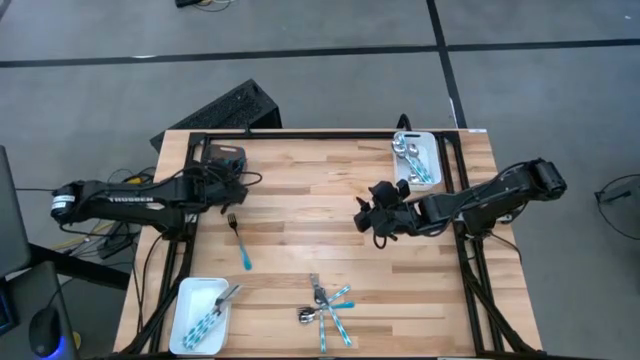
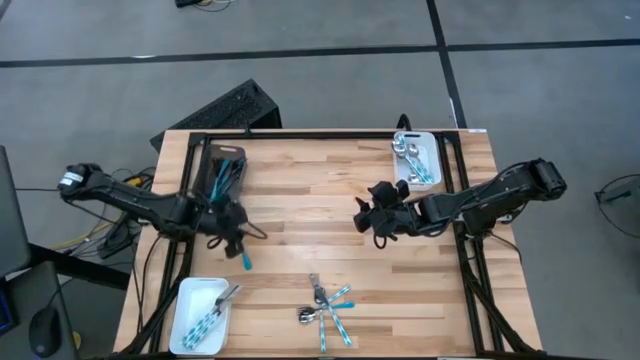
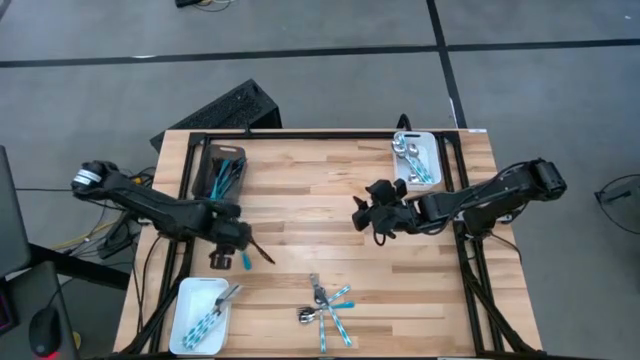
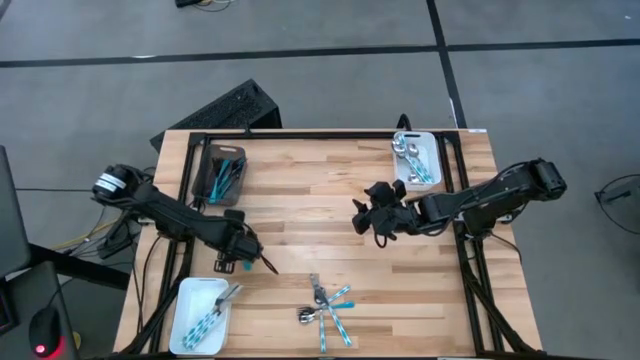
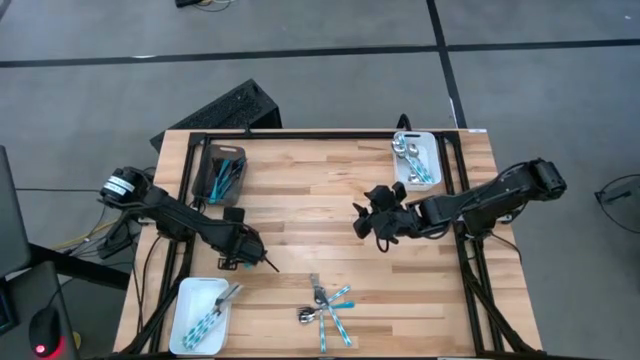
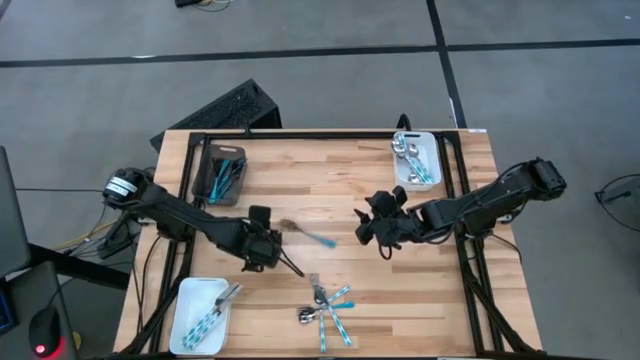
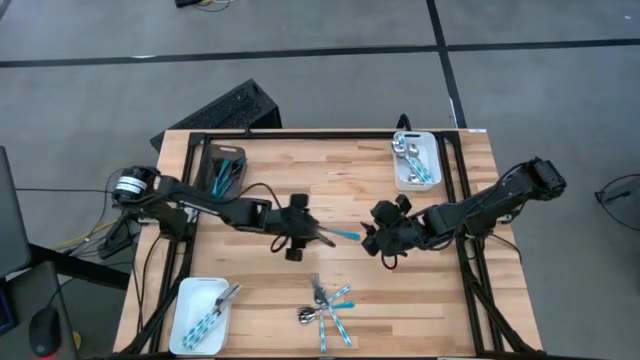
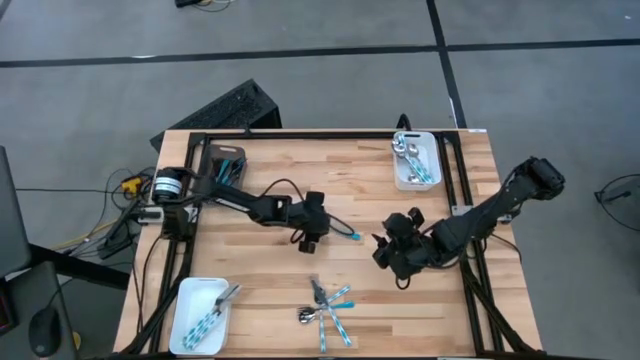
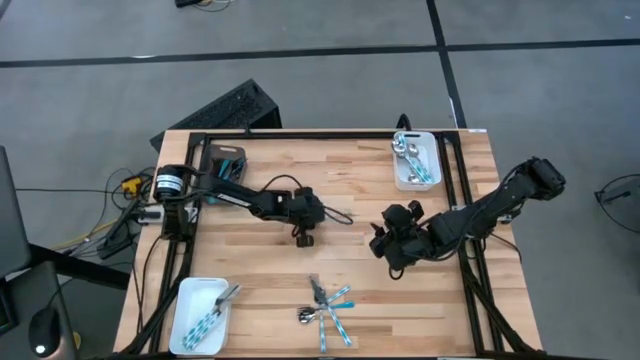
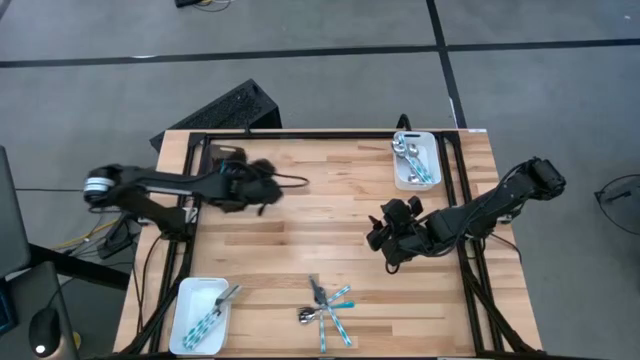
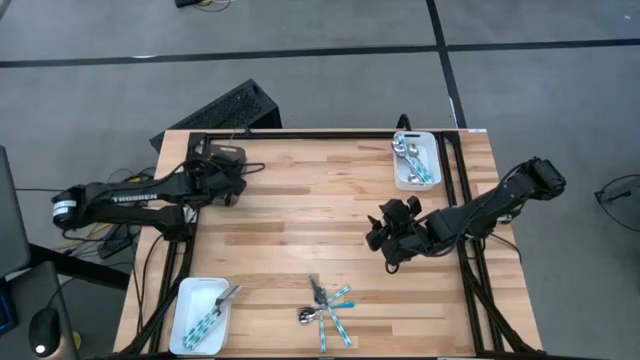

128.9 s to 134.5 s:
Task: Sort silverware by color (type)
Put the blue fork into the black bin

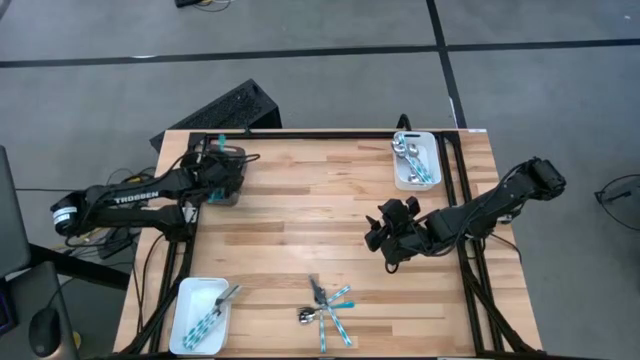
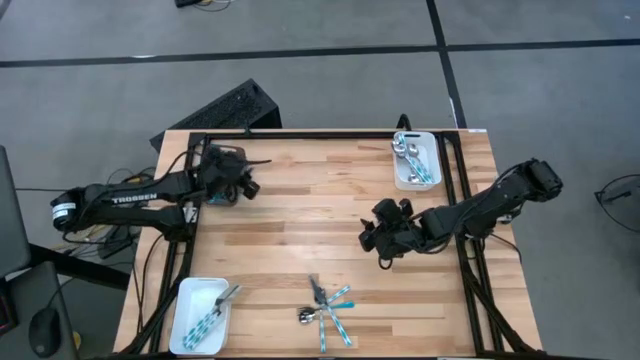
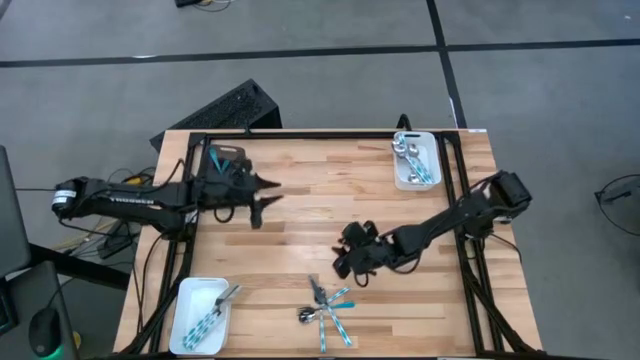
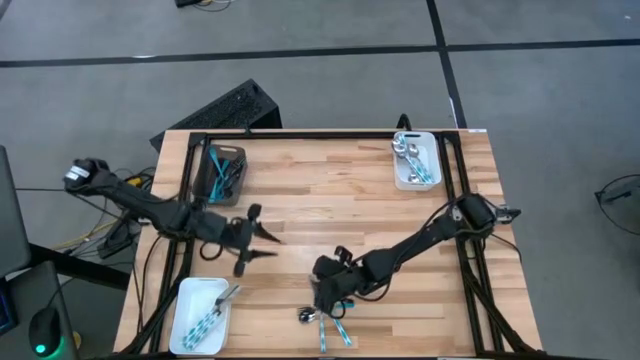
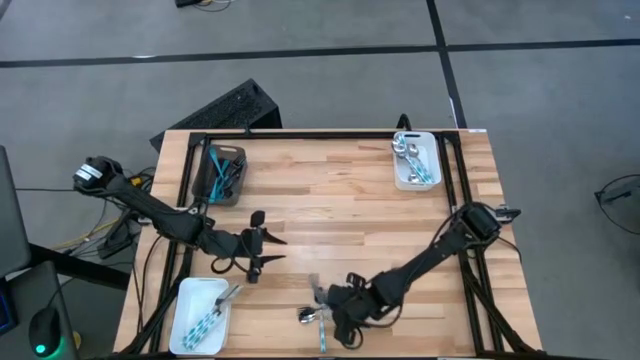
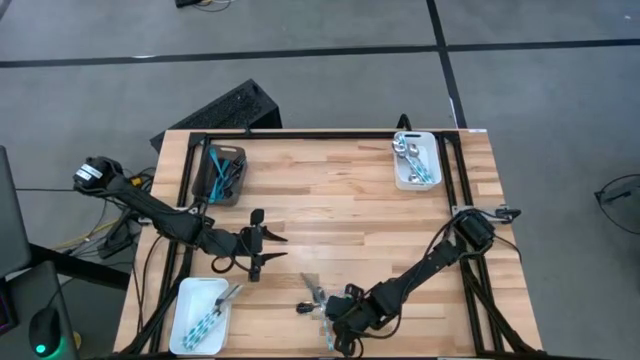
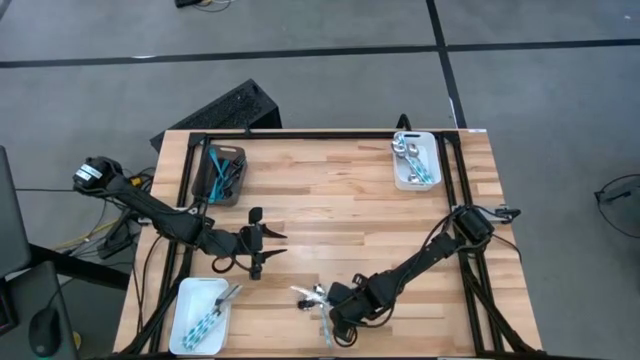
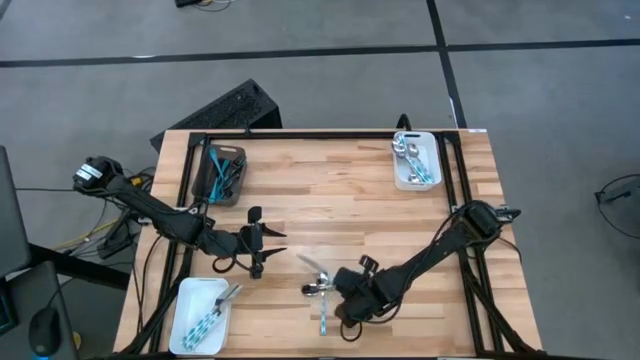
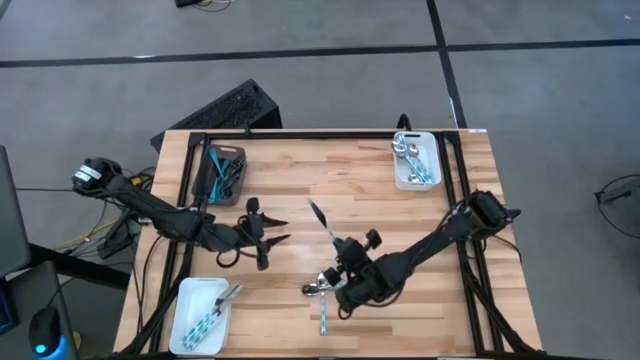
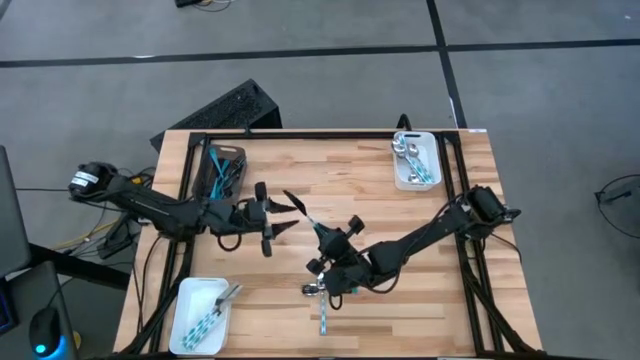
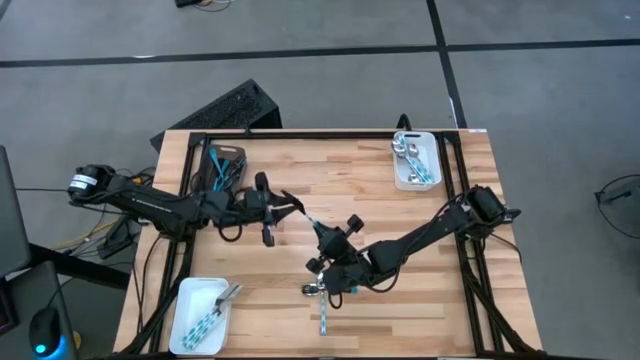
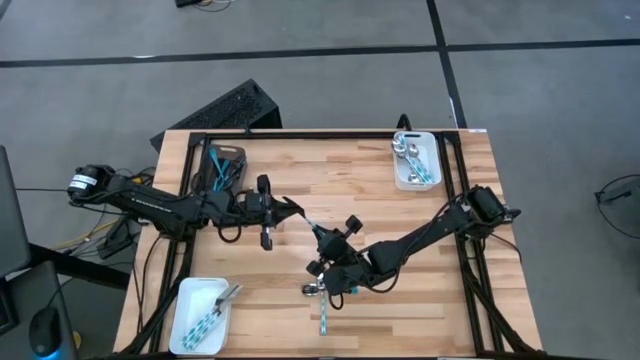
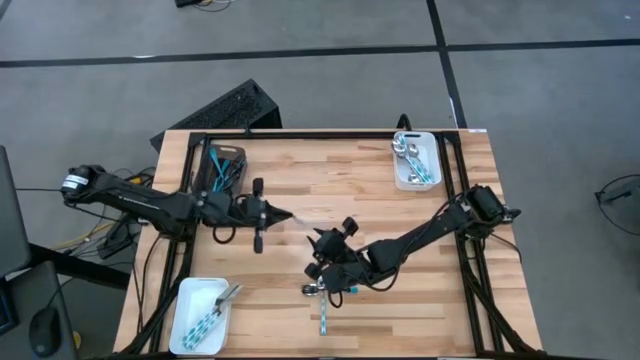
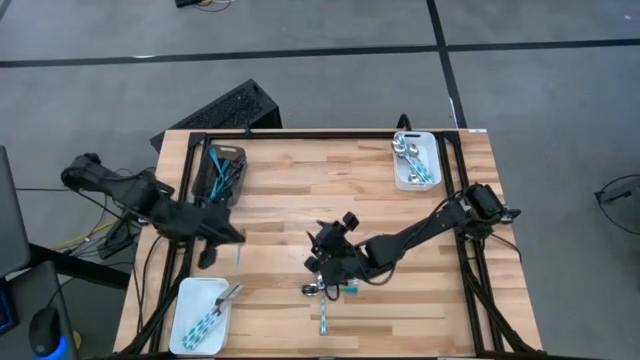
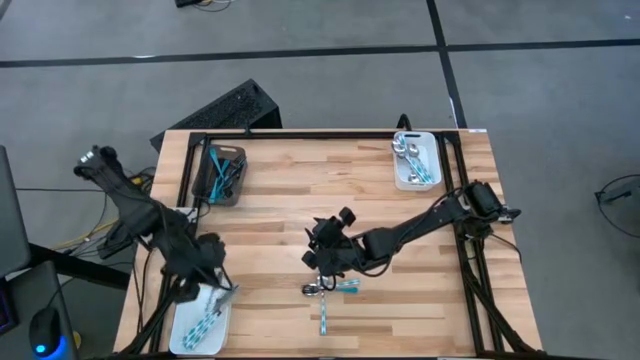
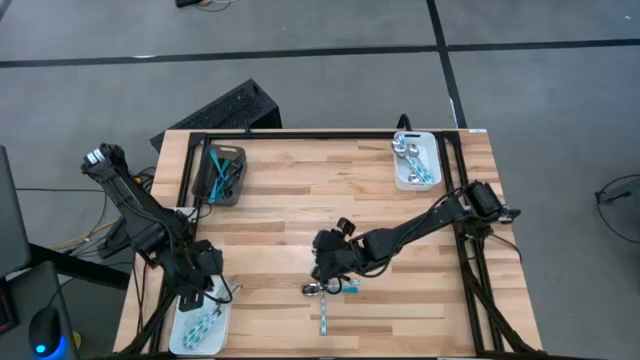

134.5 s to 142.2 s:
Put the blue patterned knife into the bottom left white bin

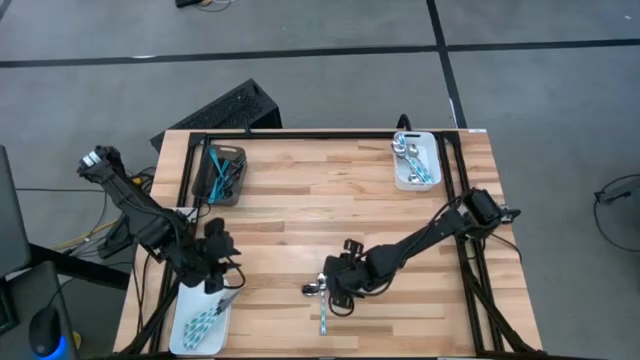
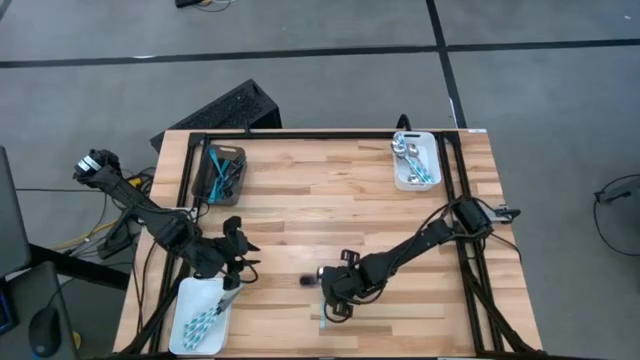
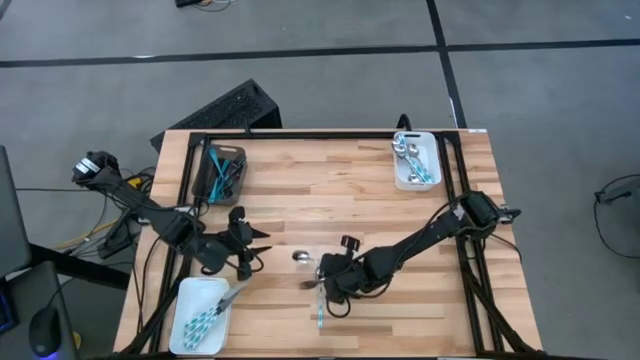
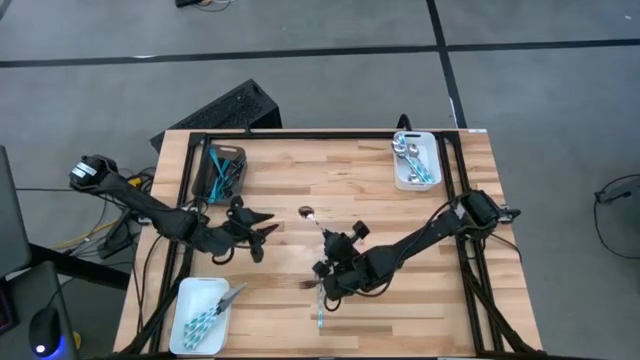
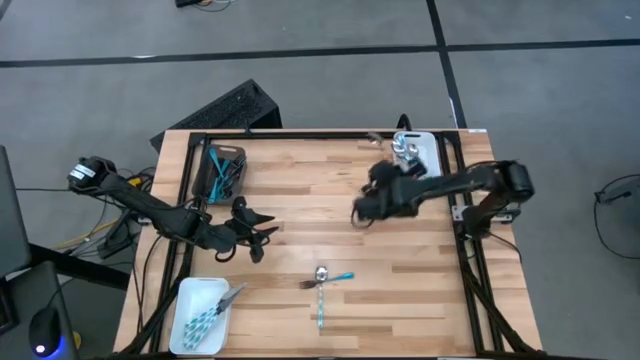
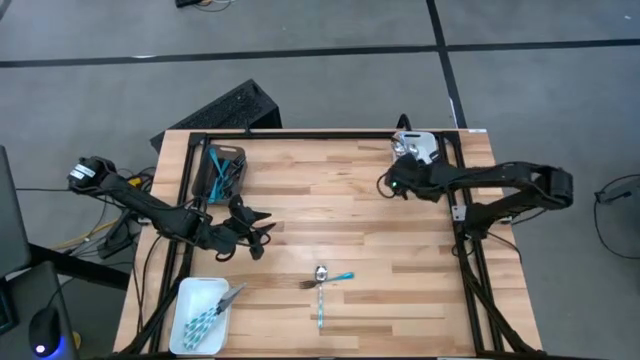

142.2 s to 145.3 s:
Put the blue patterned spoon into the top right white bin

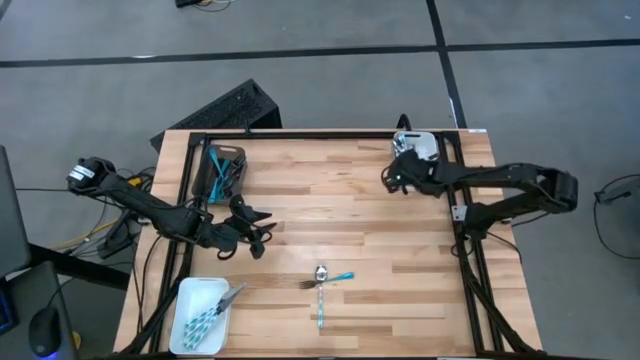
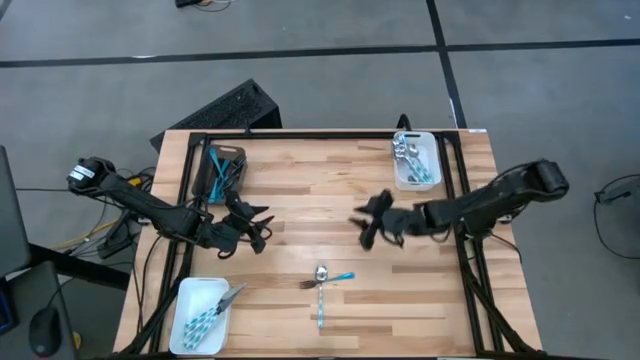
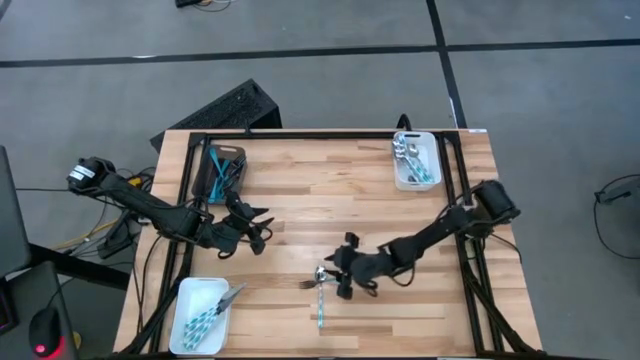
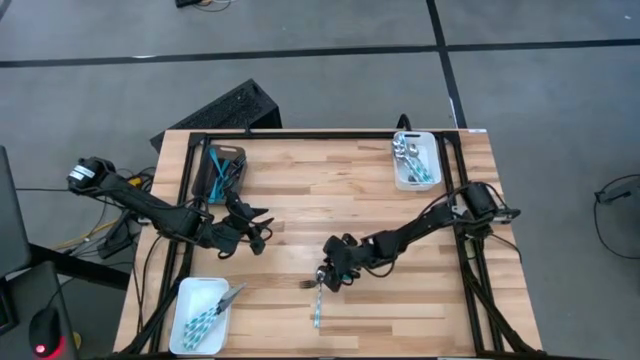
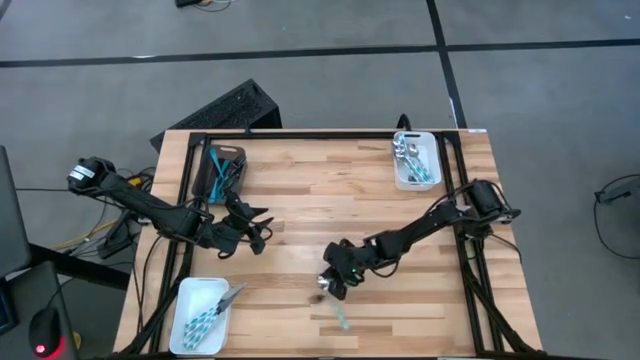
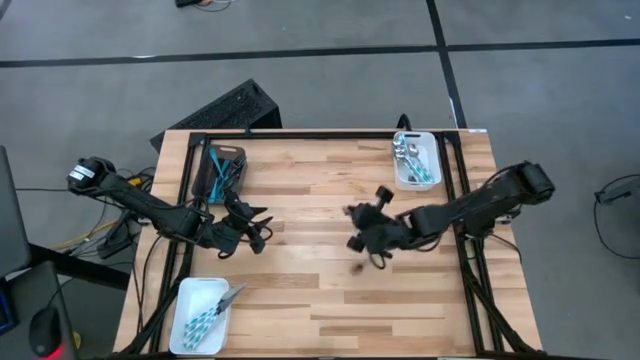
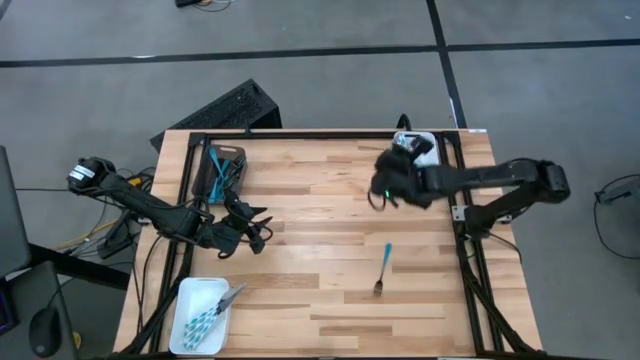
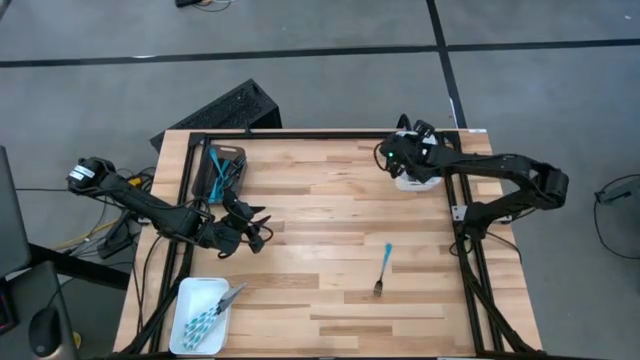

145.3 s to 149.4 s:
Put the blue patterned spoon into the top right white bin
